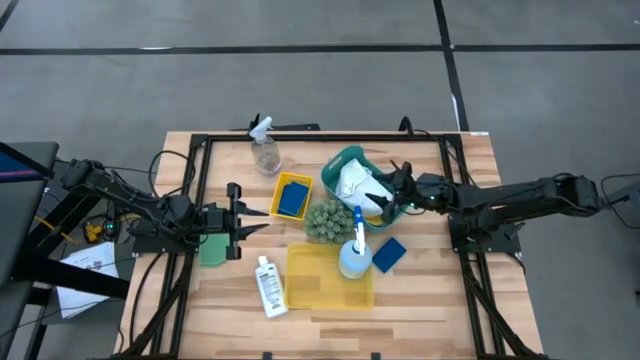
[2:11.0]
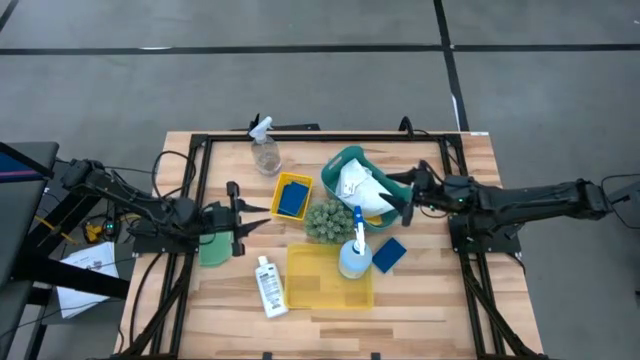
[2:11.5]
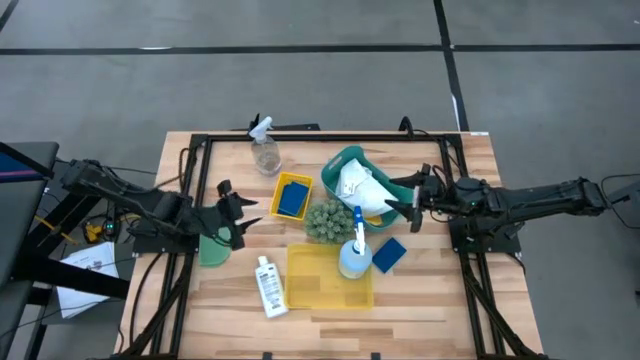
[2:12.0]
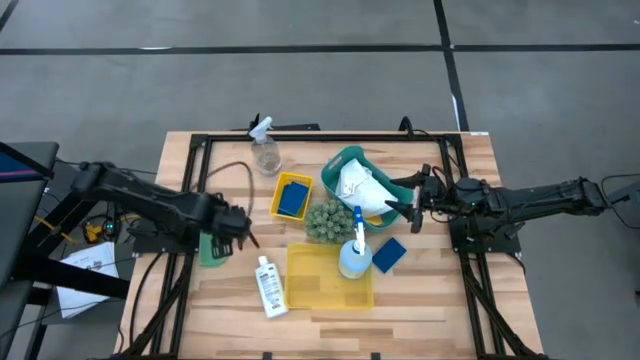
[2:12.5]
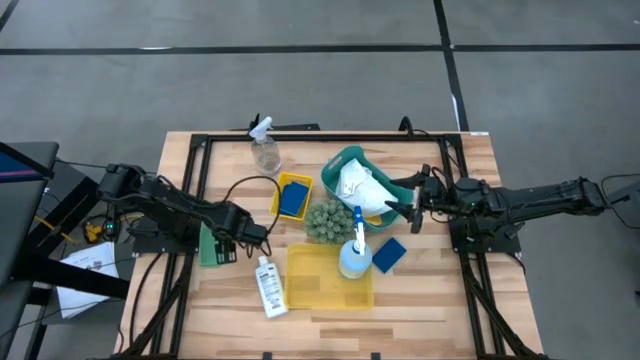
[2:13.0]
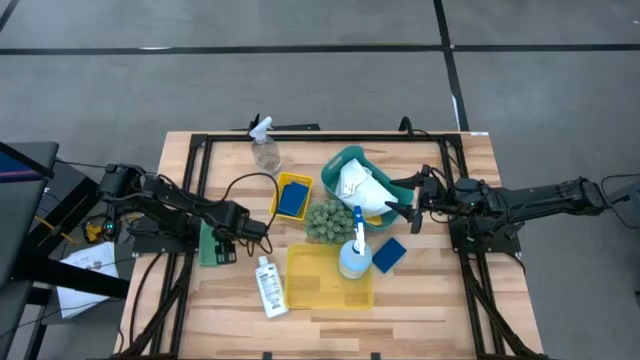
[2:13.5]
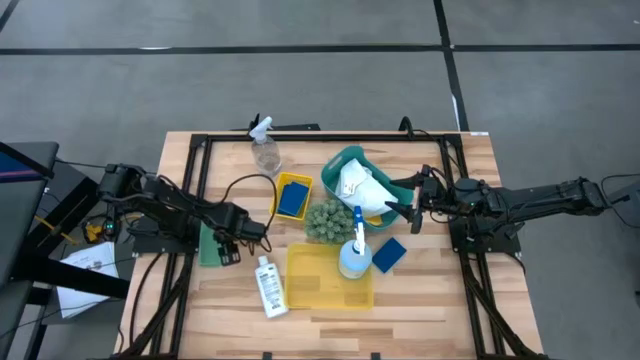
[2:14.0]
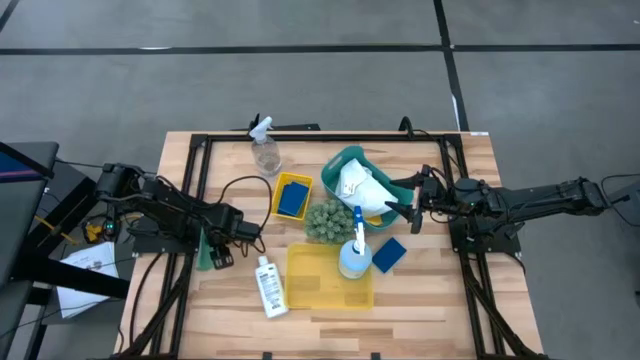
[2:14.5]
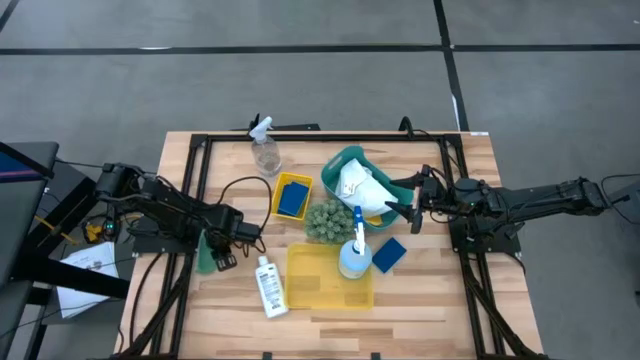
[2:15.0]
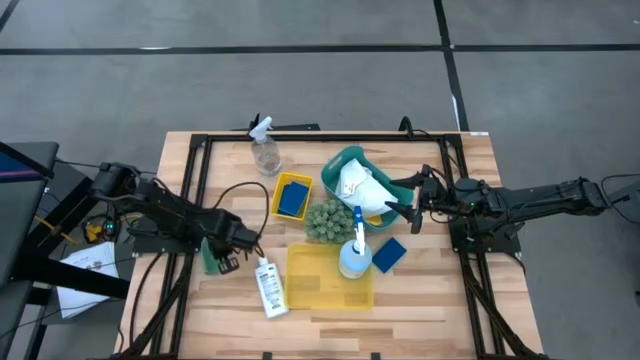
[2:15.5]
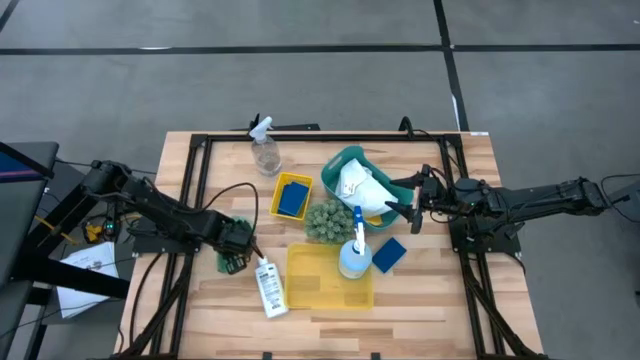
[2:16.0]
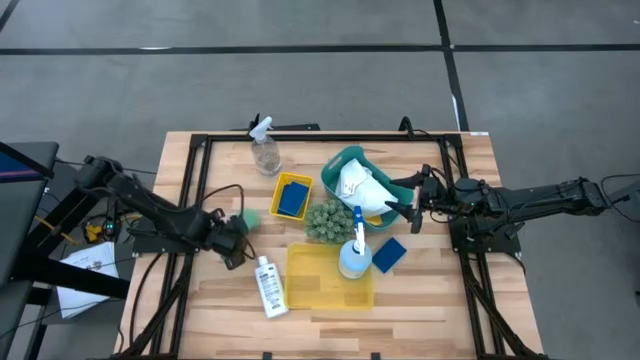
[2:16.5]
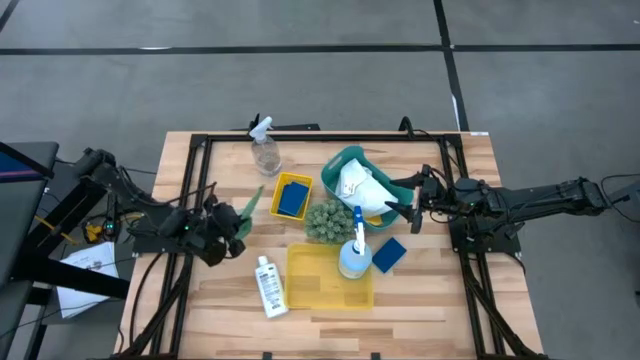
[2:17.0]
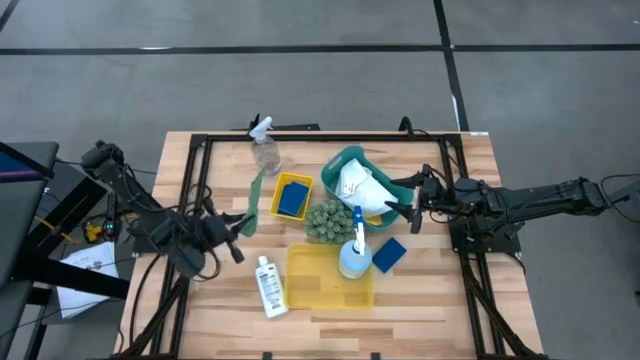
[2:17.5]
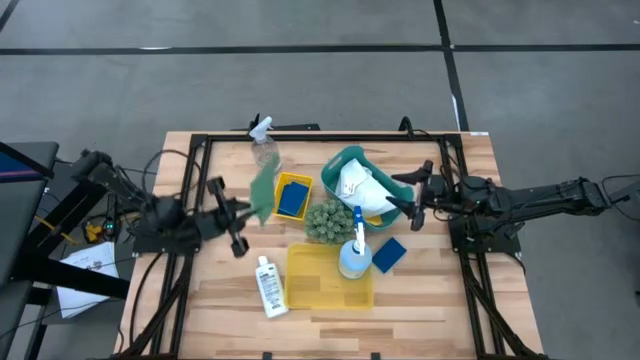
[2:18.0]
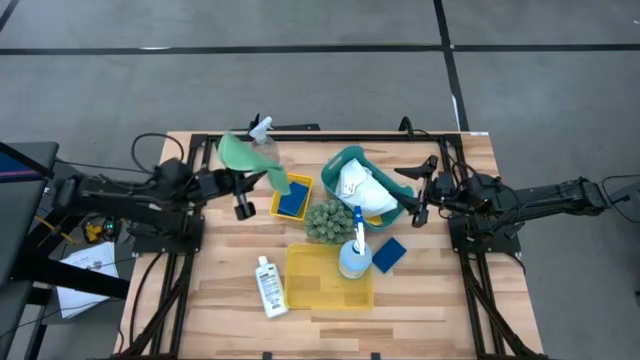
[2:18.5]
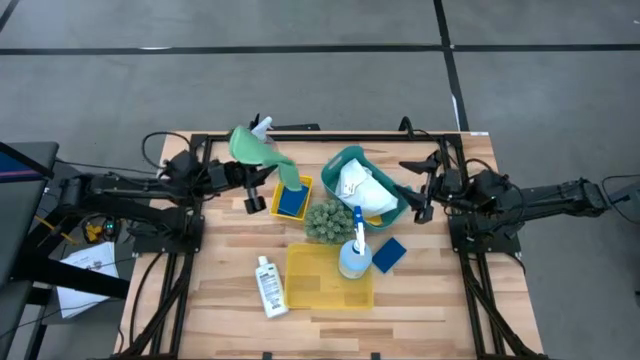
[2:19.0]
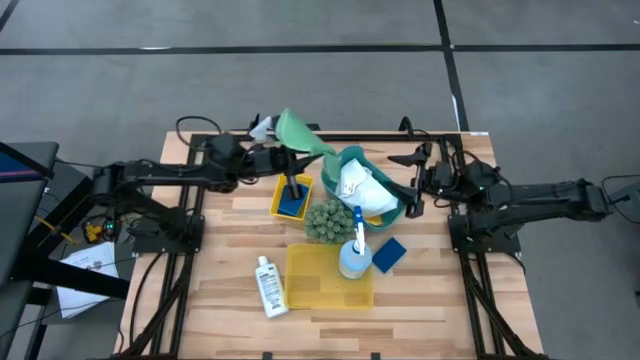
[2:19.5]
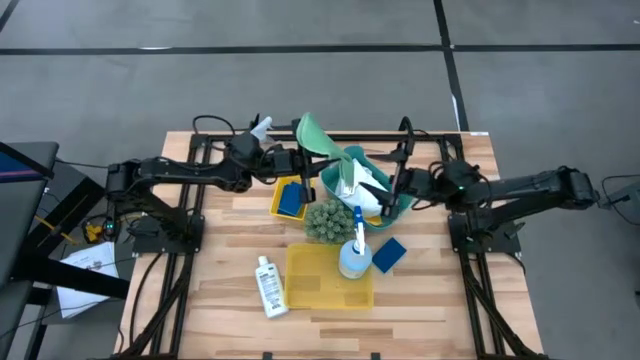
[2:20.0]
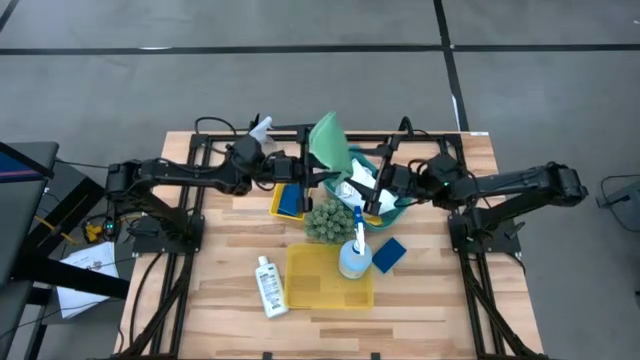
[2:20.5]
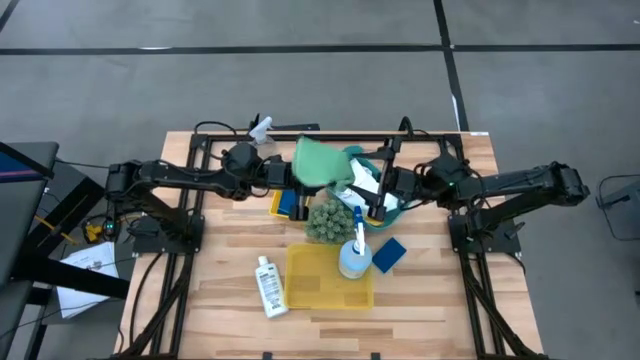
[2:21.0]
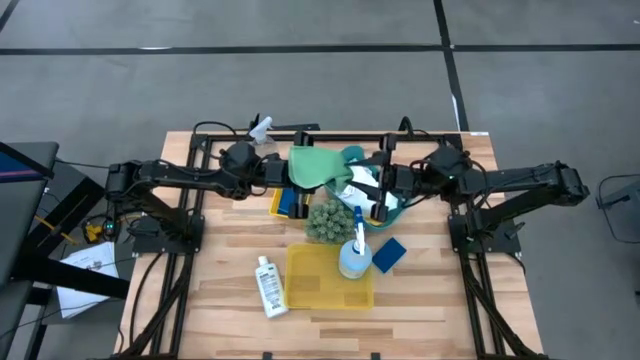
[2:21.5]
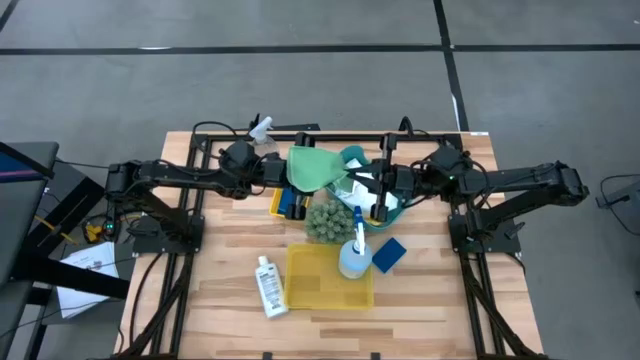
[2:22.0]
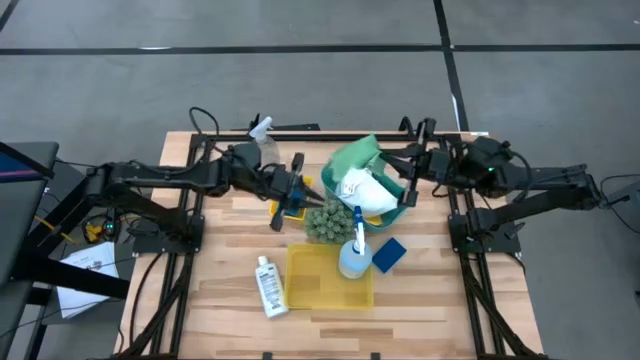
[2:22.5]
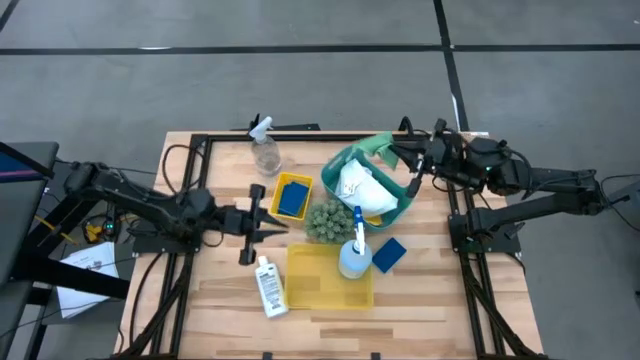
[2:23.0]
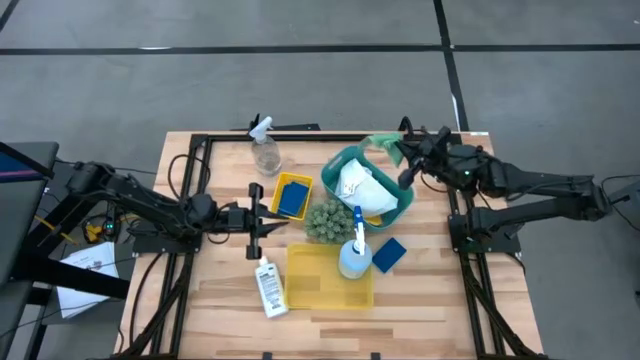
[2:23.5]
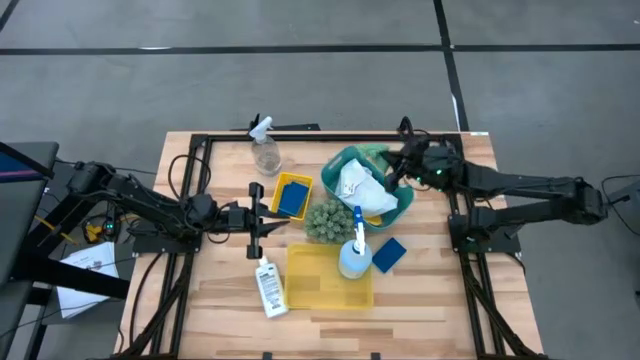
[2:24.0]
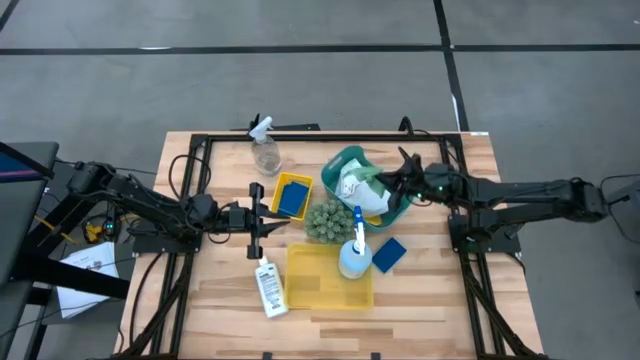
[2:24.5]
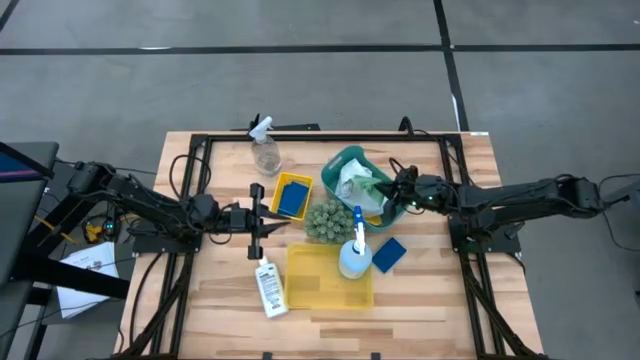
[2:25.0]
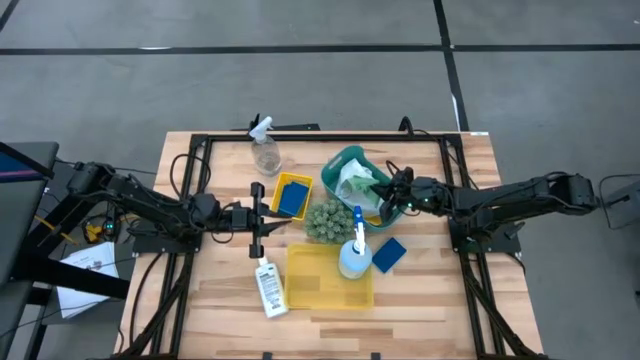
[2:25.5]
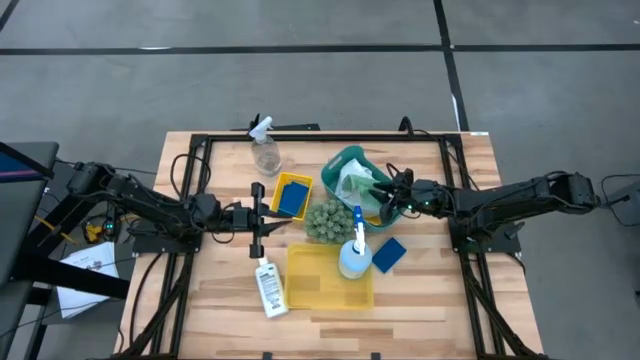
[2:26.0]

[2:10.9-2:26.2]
Task: Pick & Place Kitchen Items
Put the green microfiber cloth into the green bin

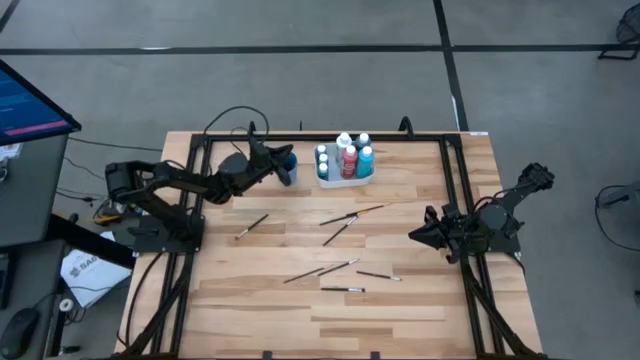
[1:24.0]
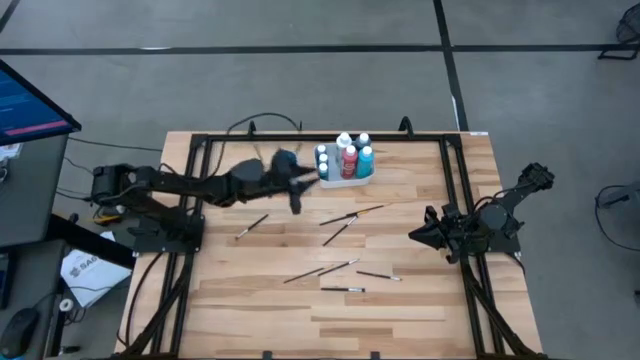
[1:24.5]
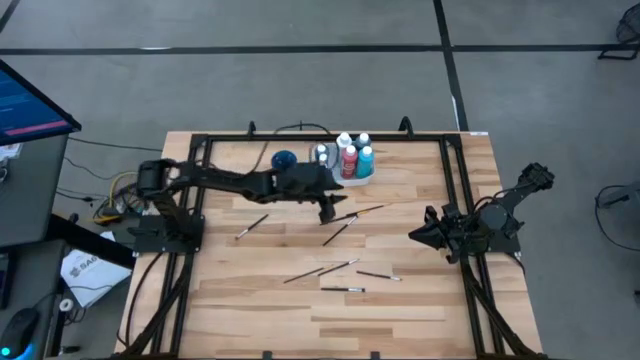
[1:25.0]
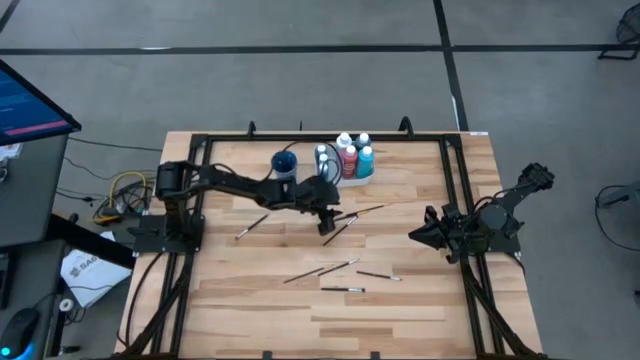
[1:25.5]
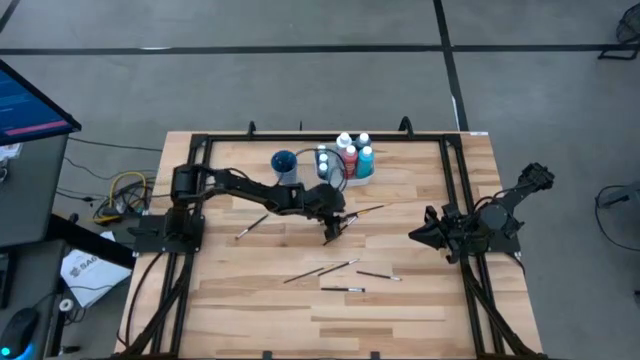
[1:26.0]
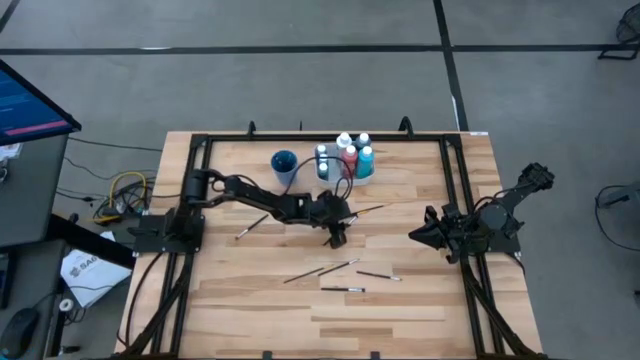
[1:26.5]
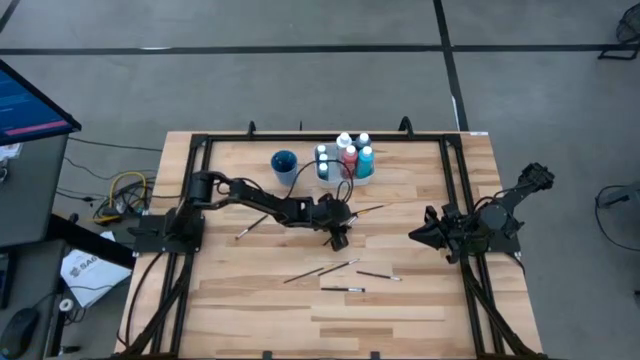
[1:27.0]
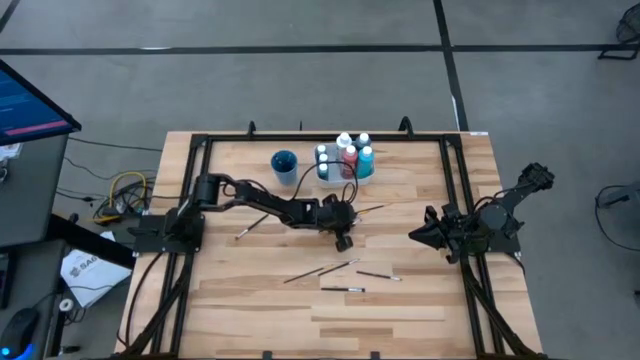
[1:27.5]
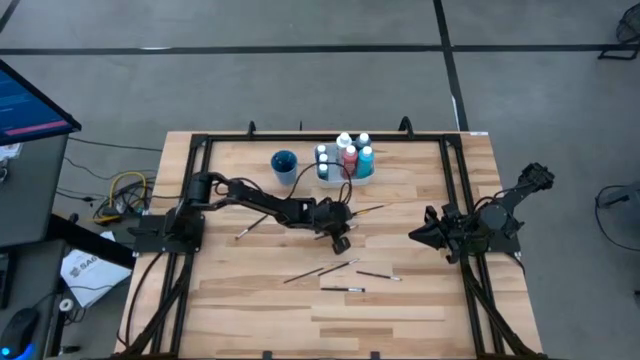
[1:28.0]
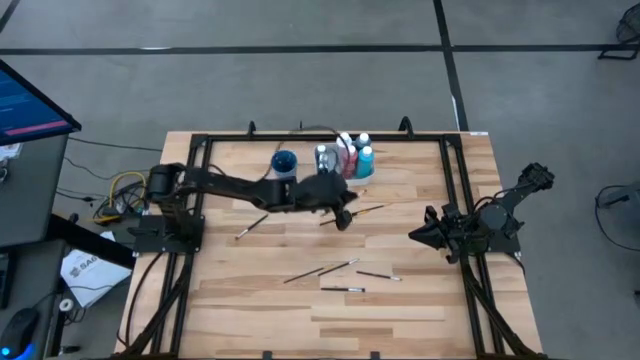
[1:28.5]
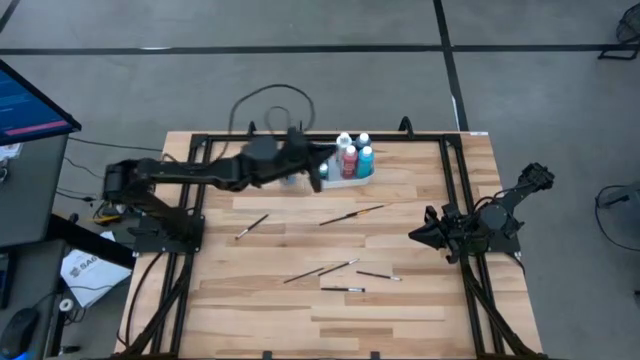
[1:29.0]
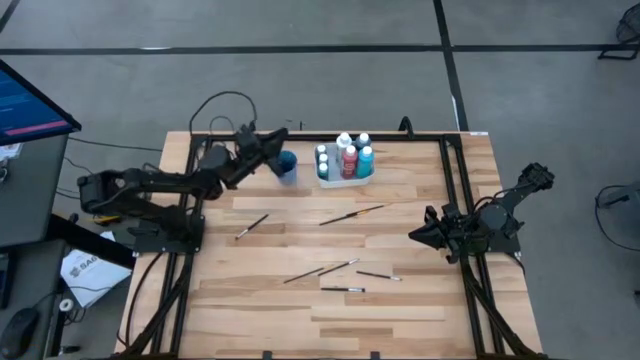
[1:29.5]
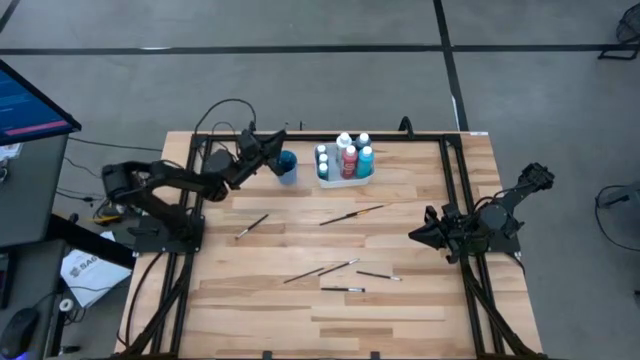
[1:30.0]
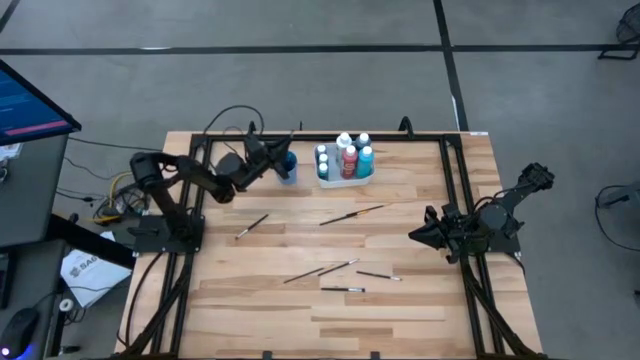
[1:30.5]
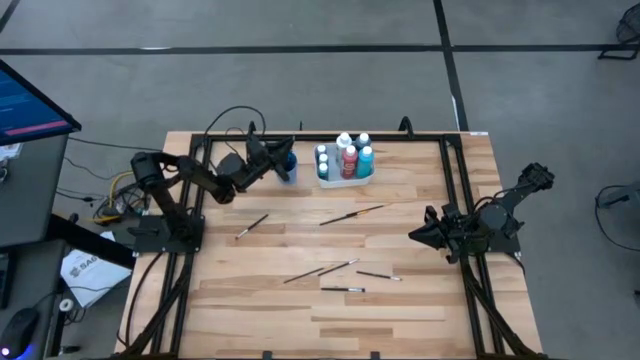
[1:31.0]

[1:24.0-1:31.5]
Task: Pick & Place Paint Supplies
Put the silver and black paint brush into the blue cup
